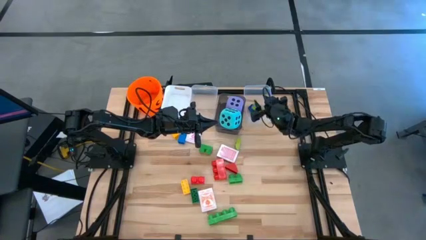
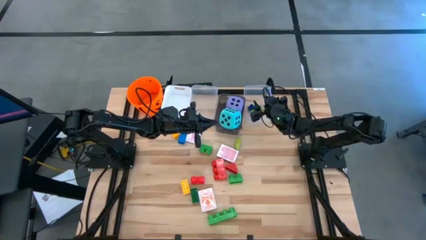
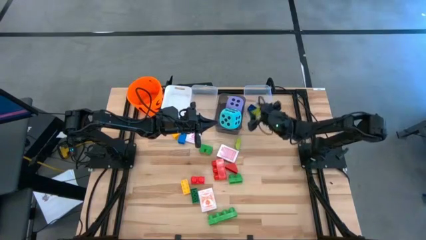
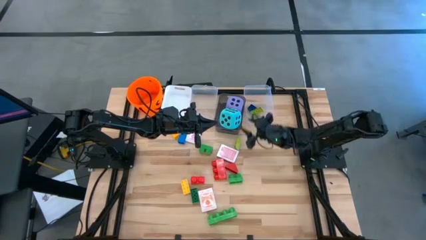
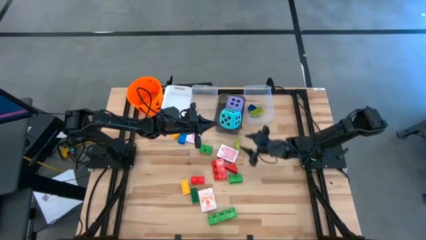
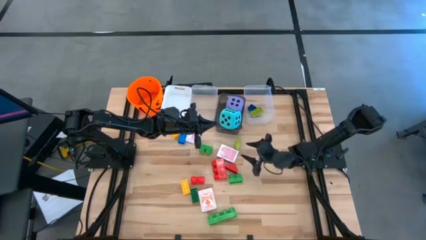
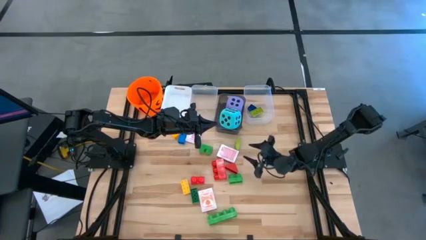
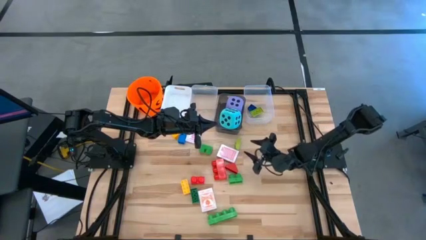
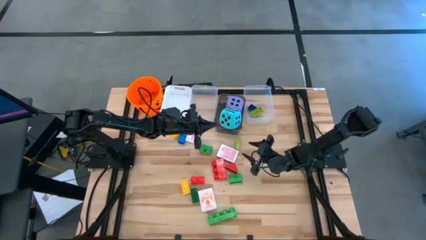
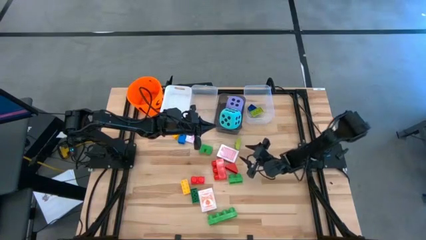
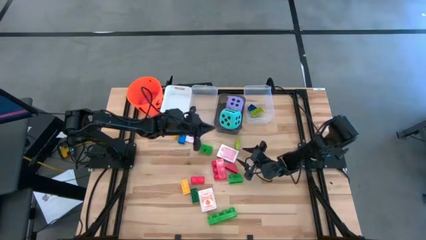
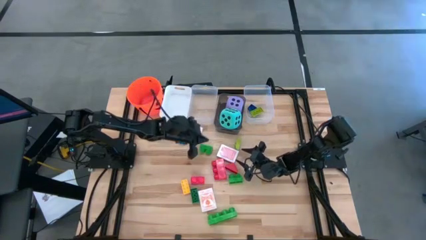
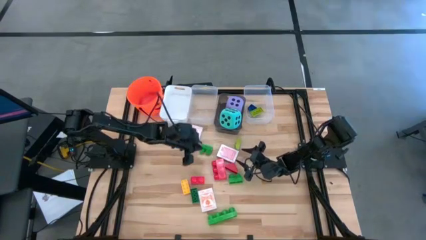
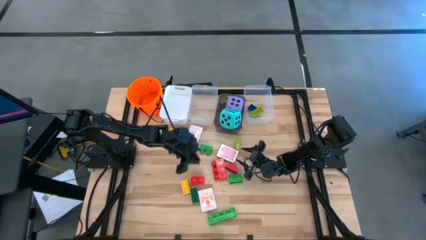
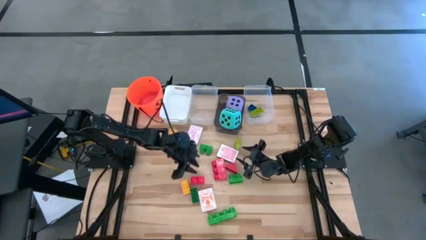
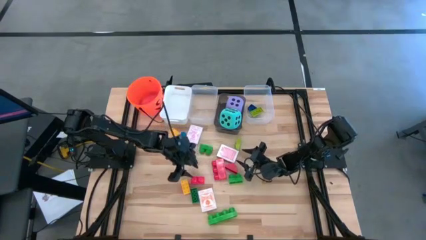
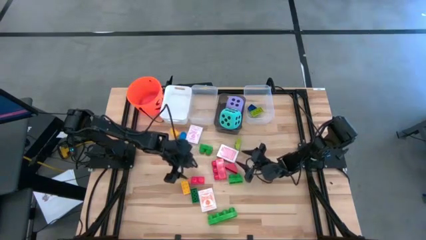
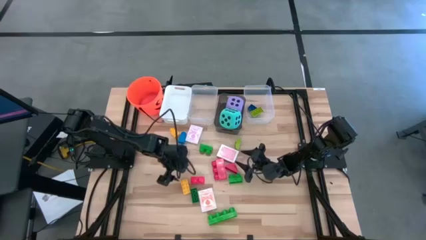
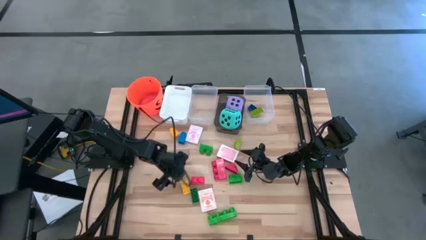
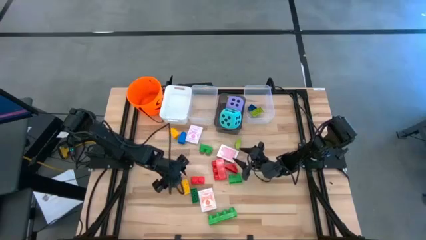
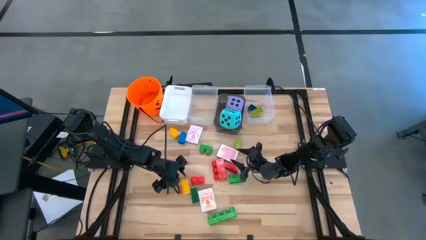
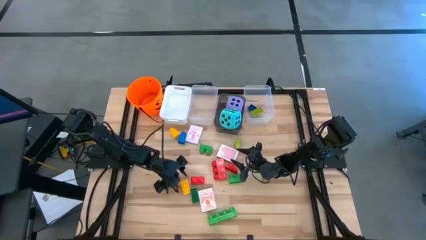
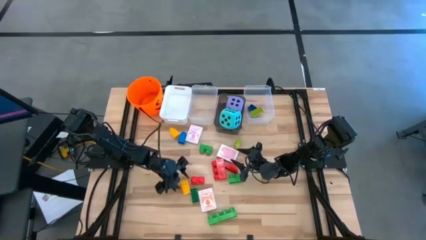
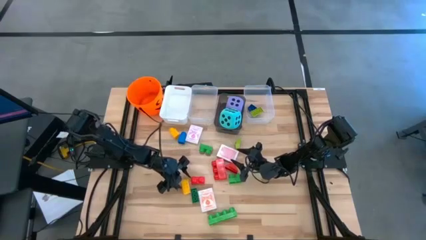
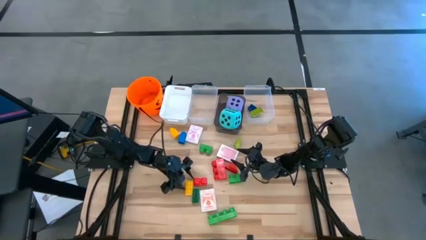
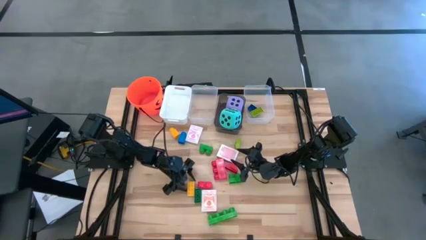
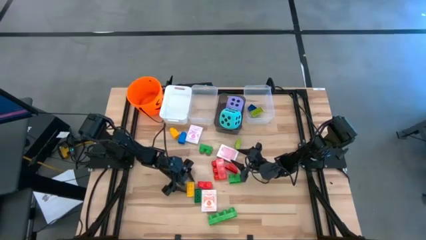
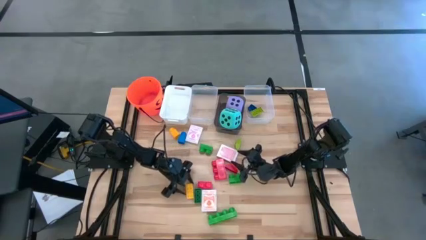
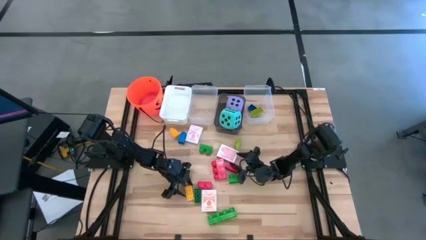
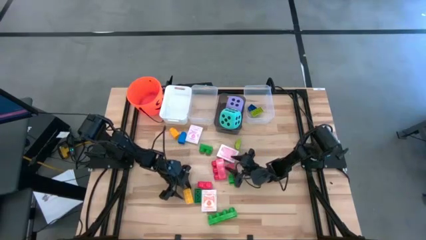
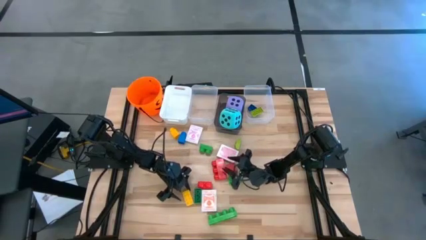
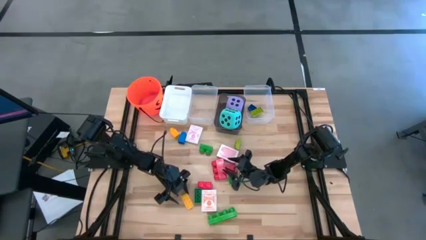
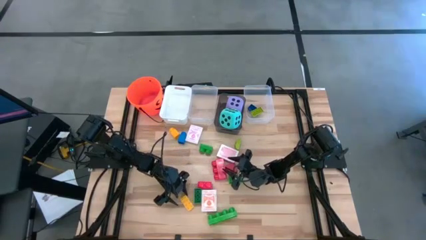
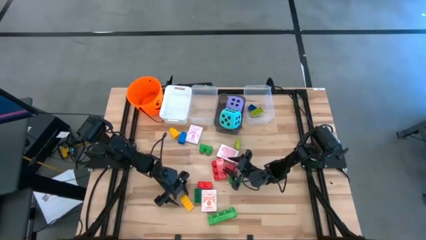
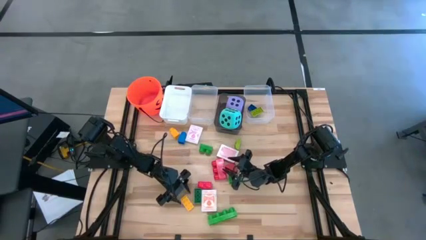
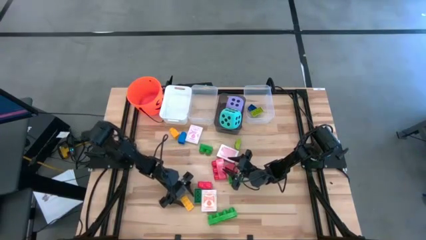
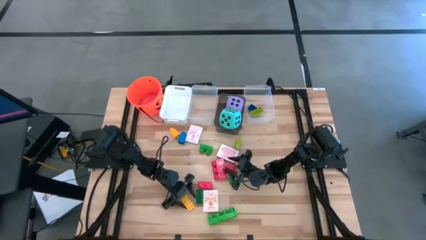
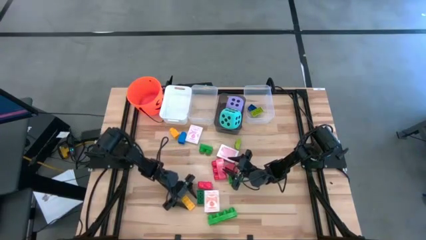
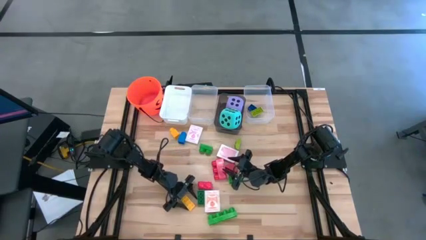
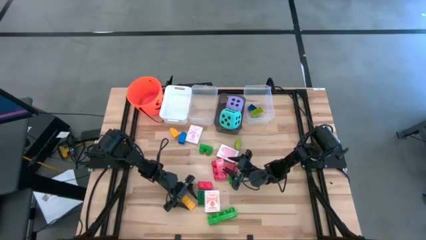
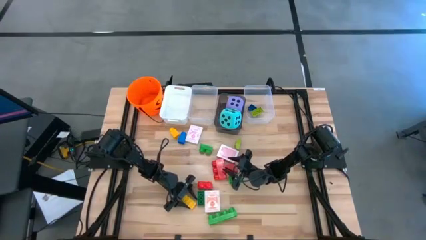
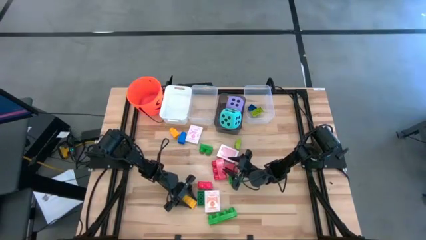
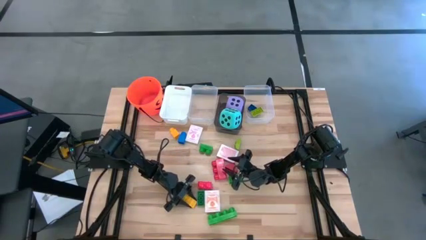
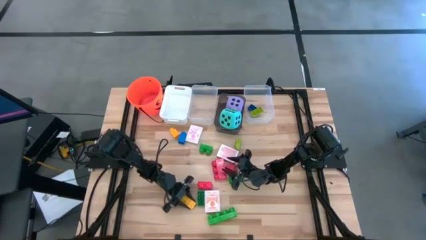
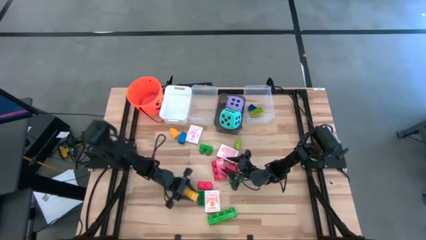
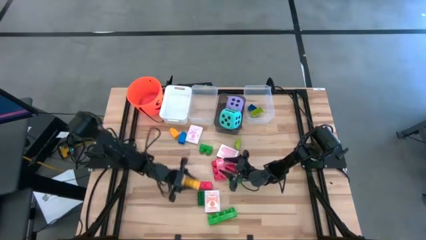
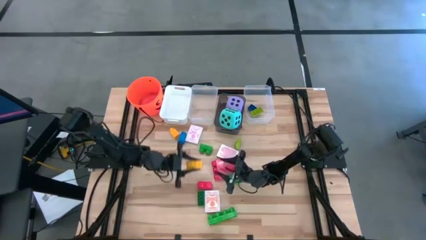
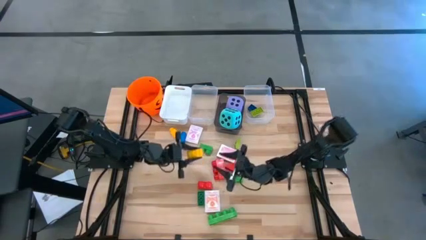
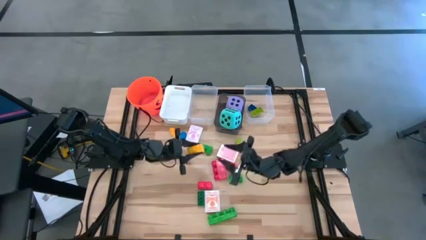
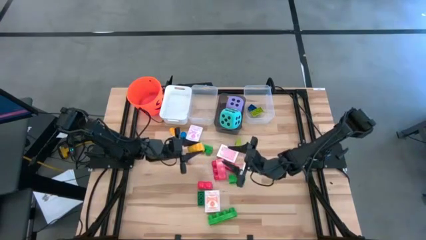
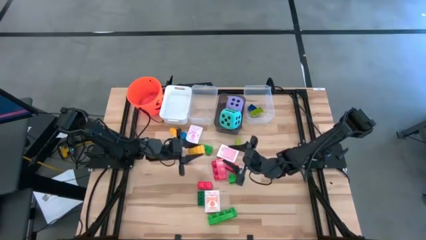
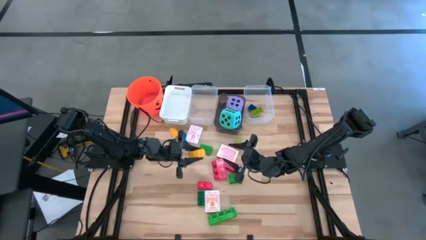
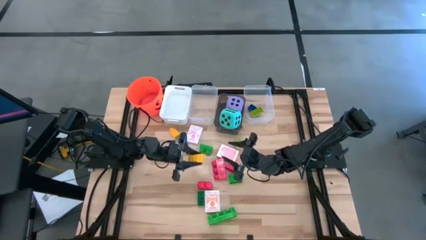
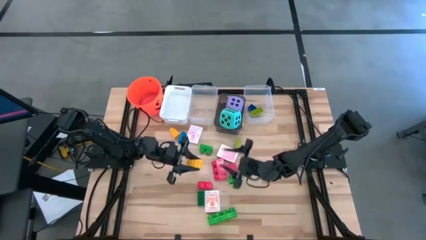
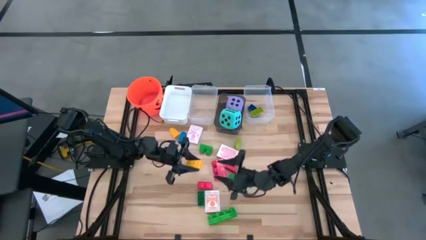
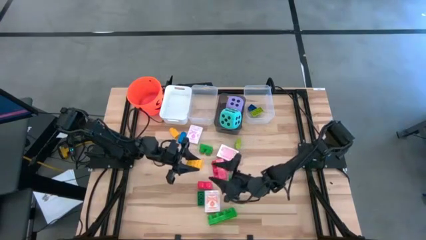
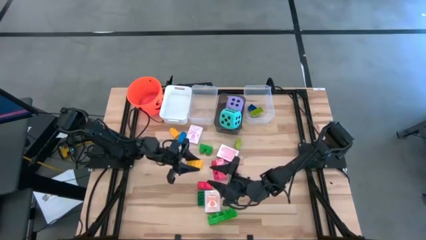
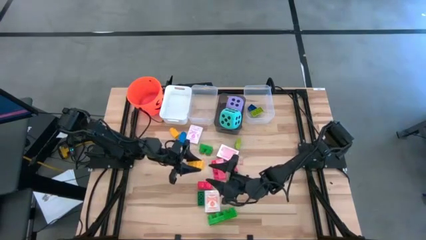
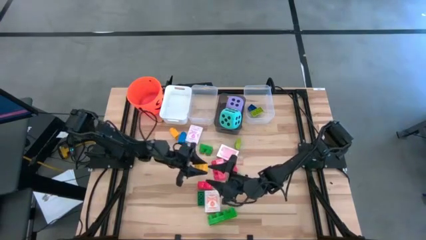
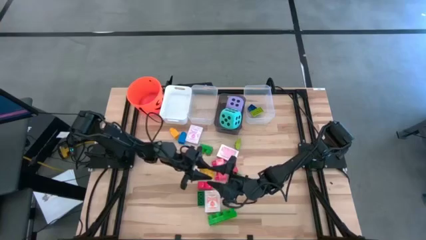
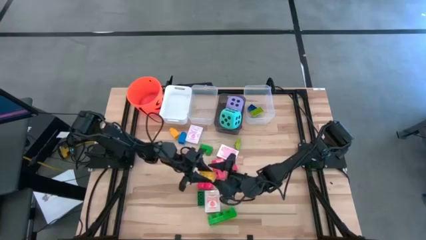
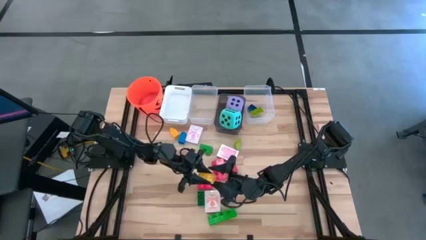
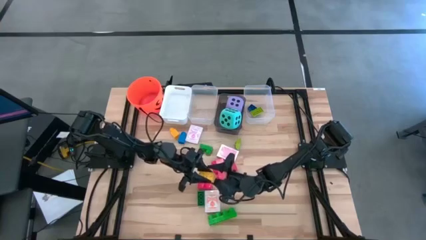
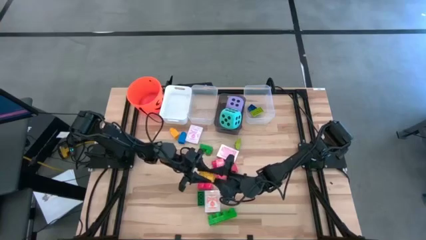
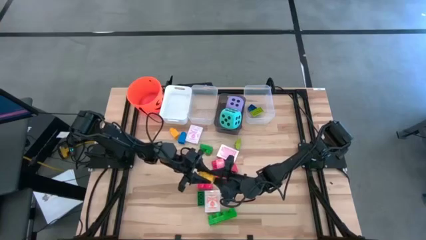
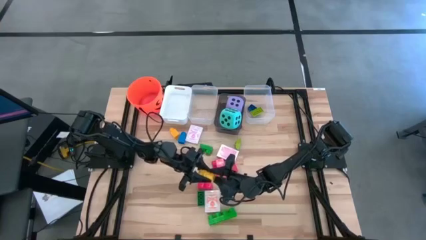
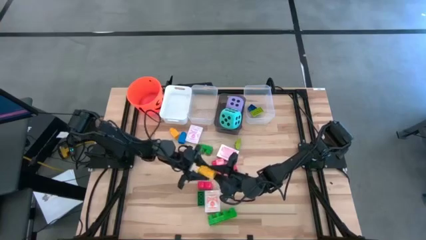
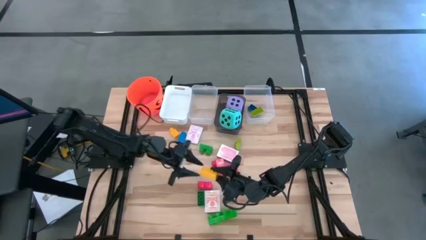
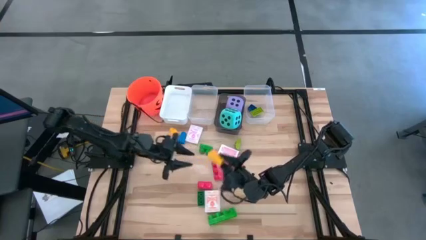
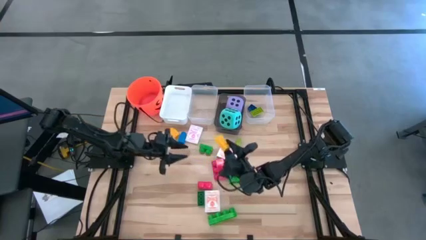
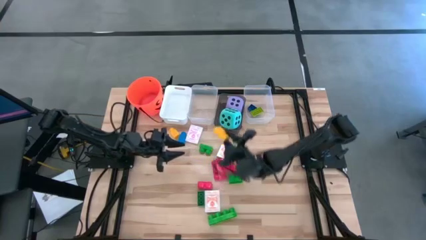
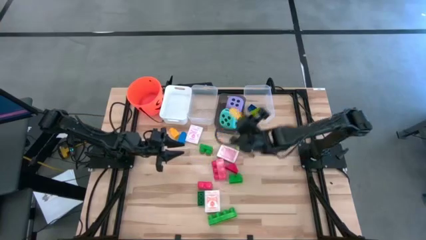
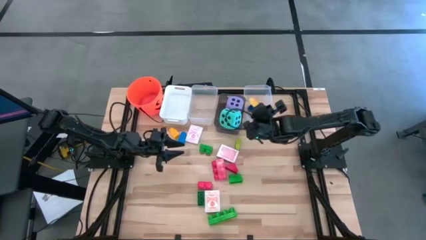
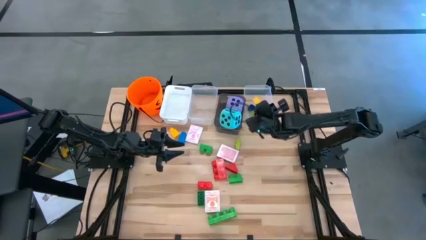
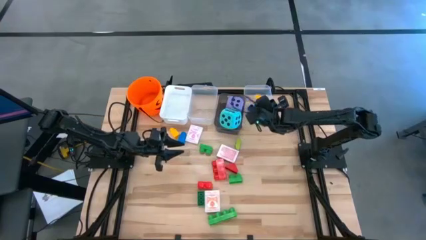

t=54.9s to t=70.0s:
Task: Pick & Place Toys
Put the small yellow game piece into the right transparent bin

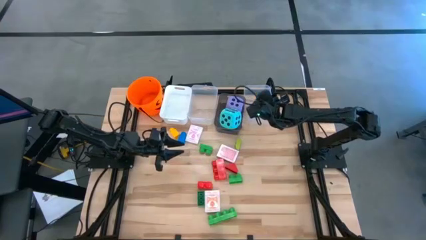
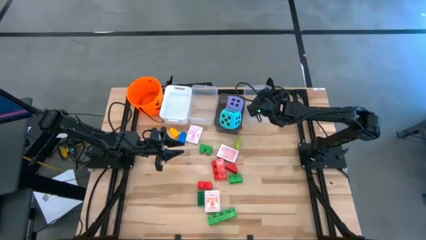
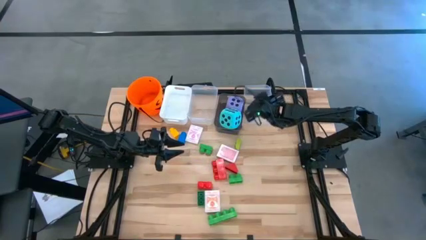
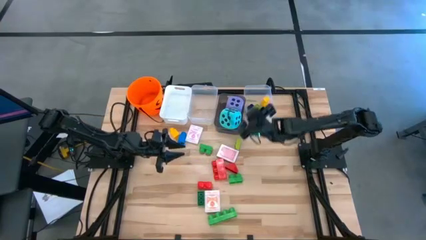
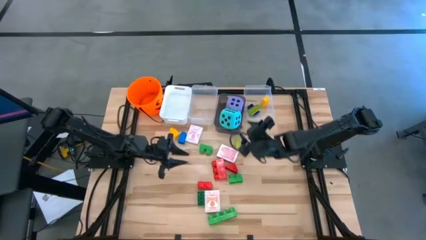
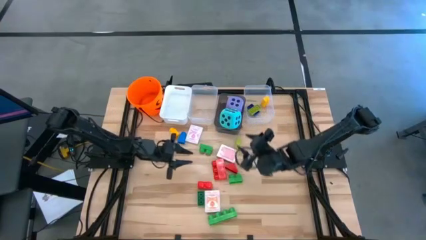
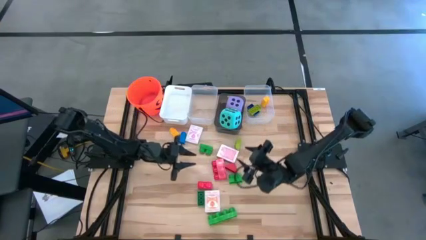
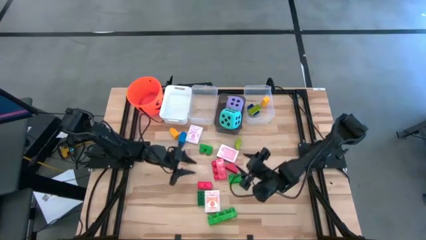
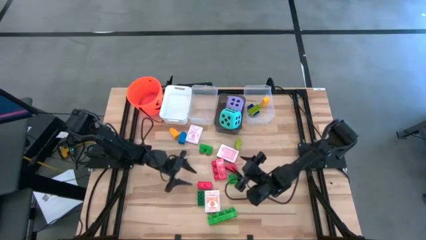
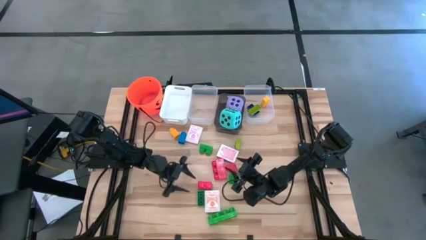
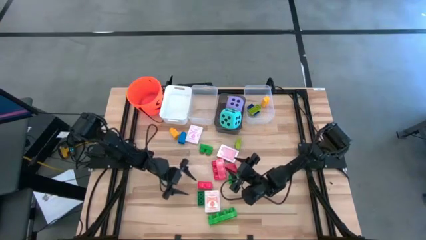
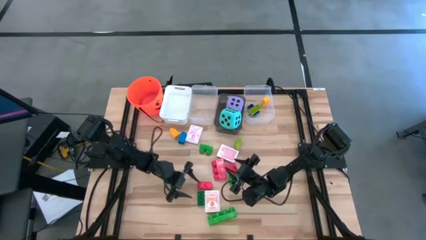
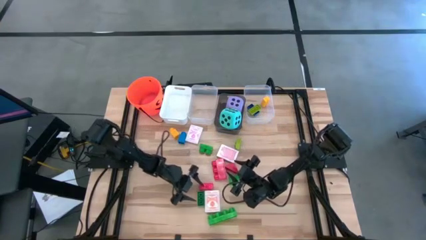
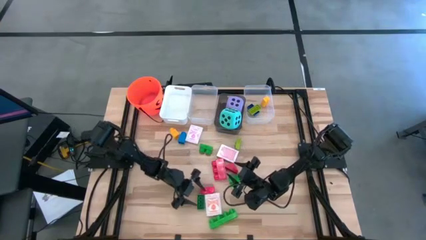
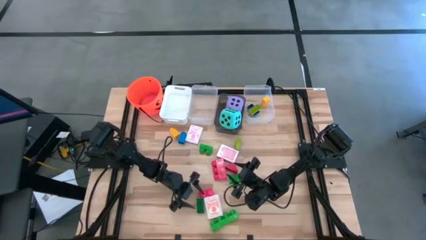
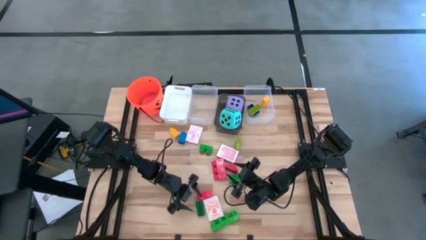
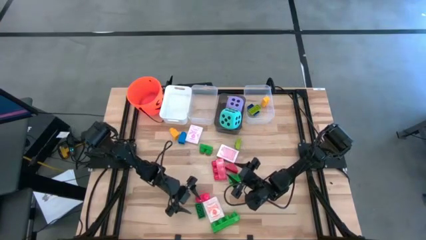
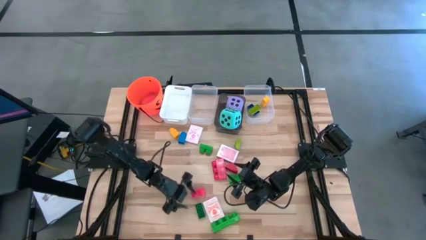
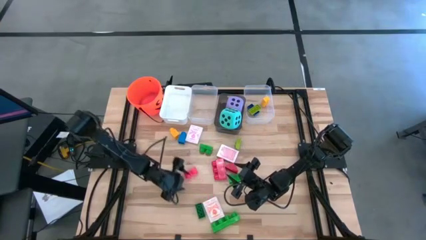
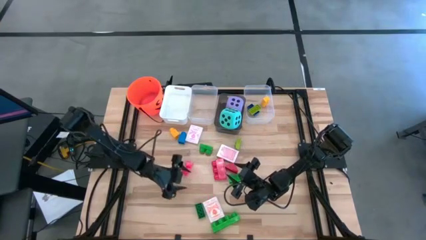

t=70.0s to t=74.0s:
Move the bottom large red game piece to the center of the table
